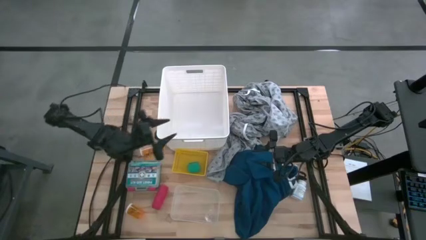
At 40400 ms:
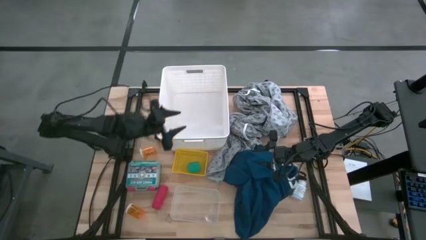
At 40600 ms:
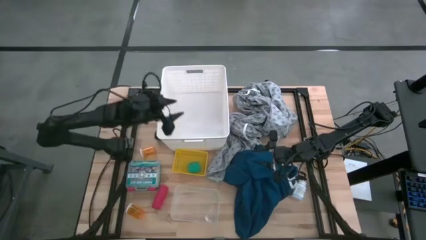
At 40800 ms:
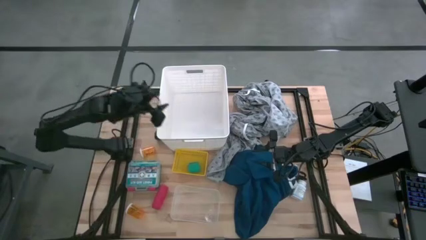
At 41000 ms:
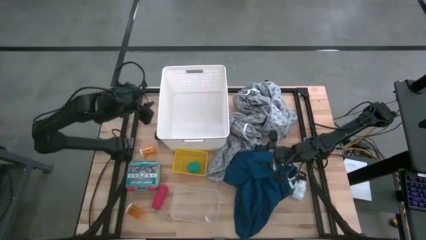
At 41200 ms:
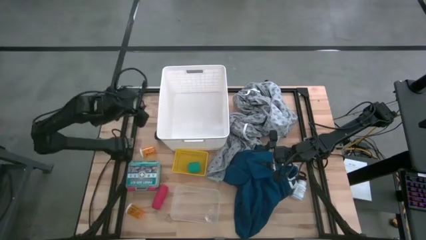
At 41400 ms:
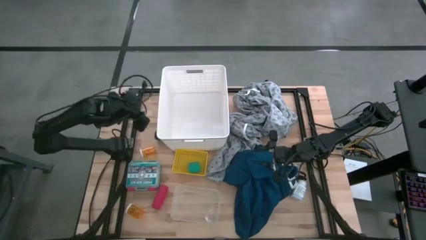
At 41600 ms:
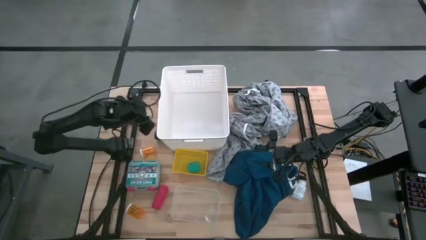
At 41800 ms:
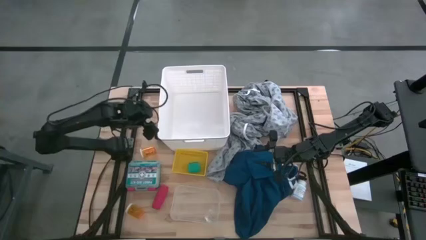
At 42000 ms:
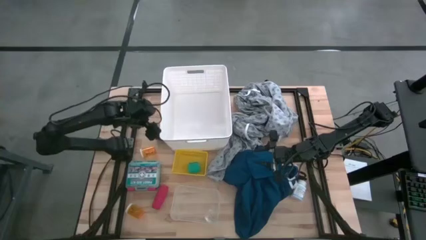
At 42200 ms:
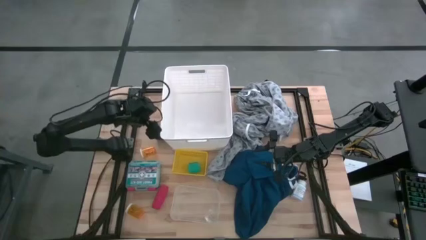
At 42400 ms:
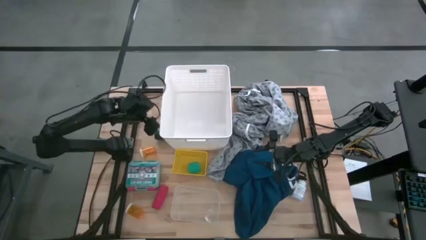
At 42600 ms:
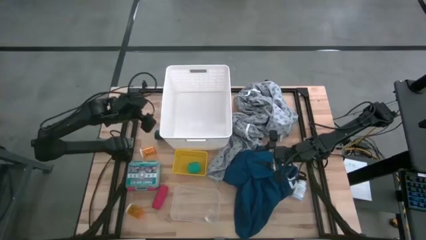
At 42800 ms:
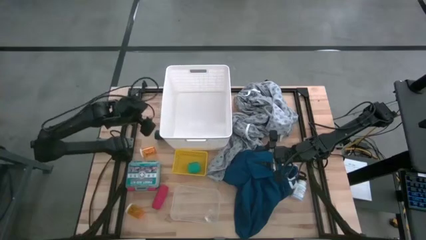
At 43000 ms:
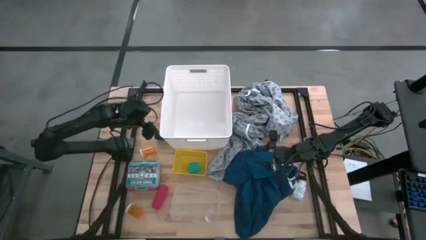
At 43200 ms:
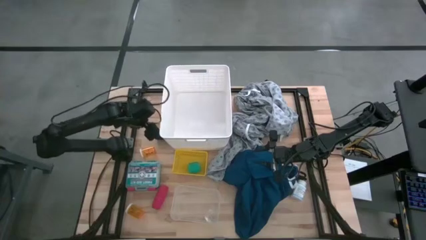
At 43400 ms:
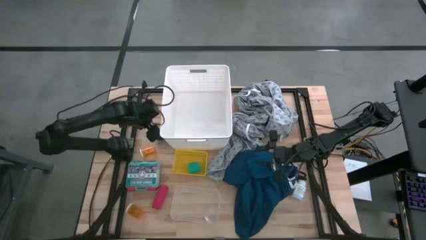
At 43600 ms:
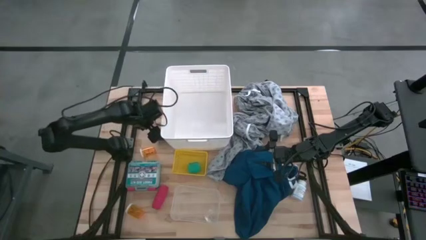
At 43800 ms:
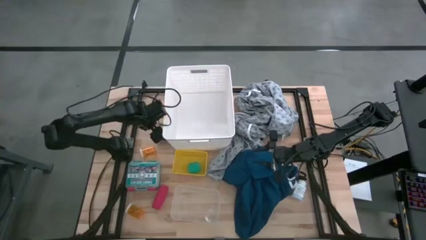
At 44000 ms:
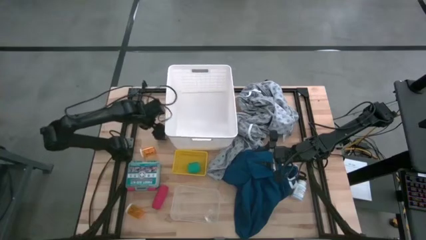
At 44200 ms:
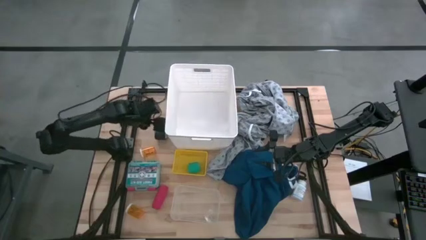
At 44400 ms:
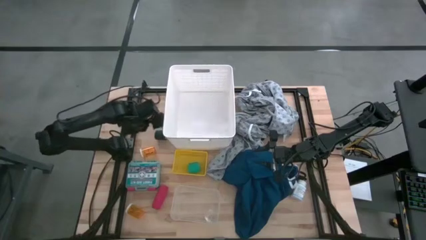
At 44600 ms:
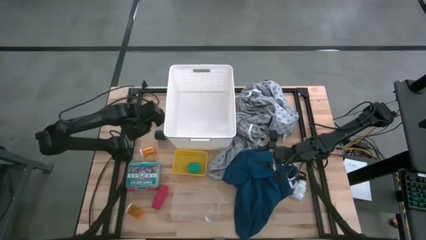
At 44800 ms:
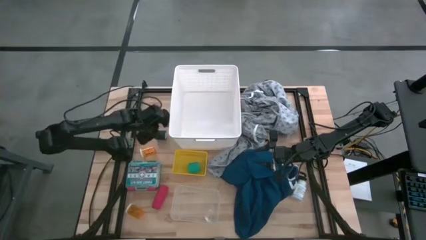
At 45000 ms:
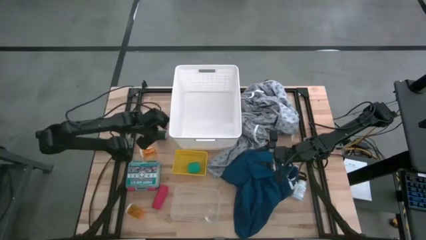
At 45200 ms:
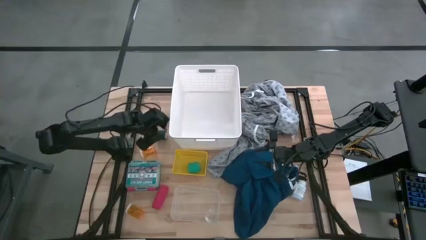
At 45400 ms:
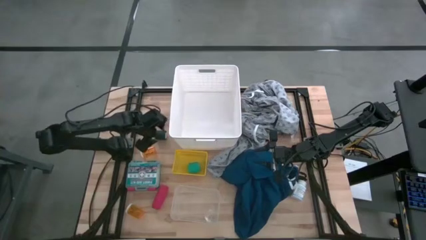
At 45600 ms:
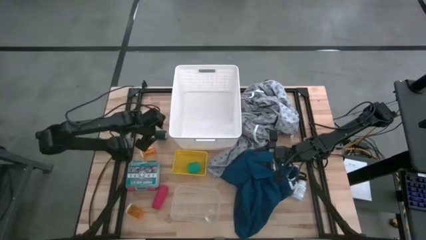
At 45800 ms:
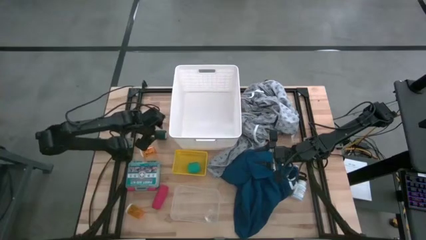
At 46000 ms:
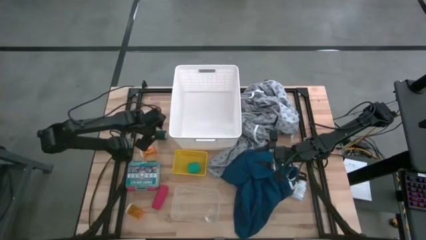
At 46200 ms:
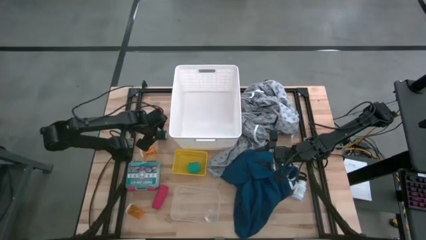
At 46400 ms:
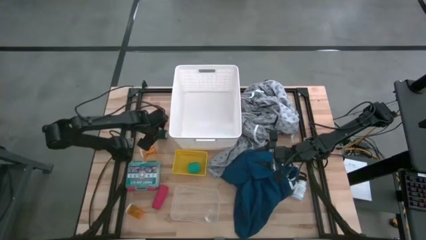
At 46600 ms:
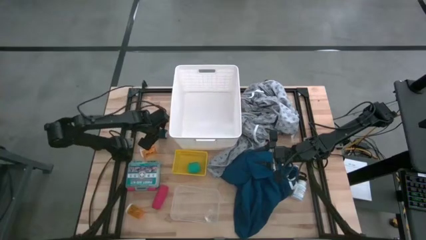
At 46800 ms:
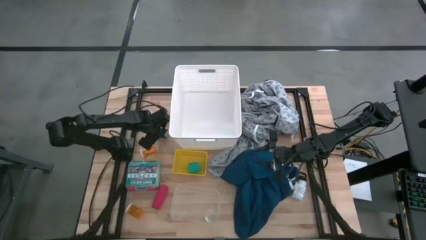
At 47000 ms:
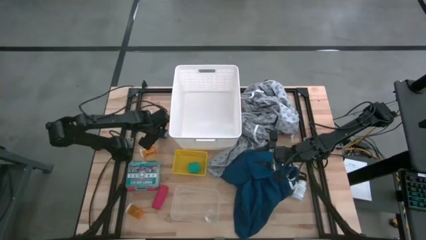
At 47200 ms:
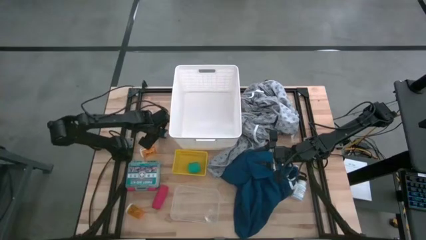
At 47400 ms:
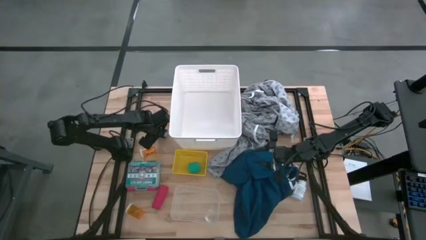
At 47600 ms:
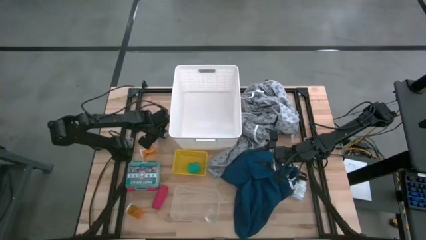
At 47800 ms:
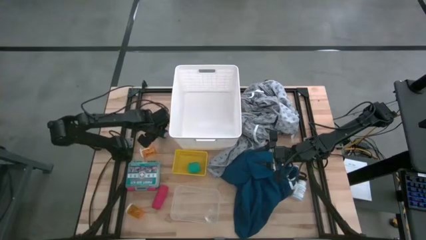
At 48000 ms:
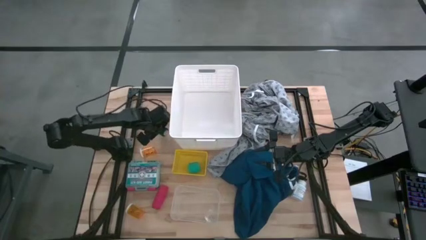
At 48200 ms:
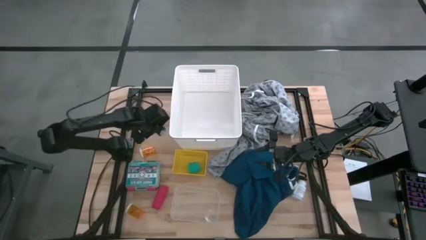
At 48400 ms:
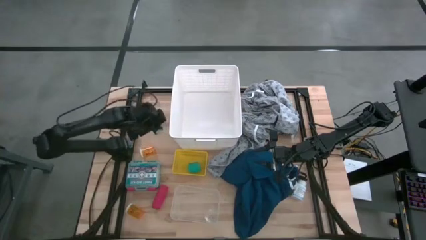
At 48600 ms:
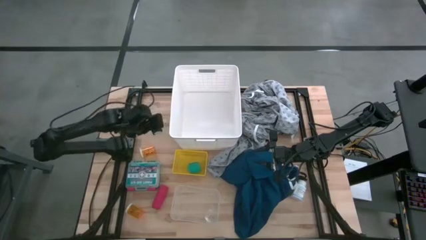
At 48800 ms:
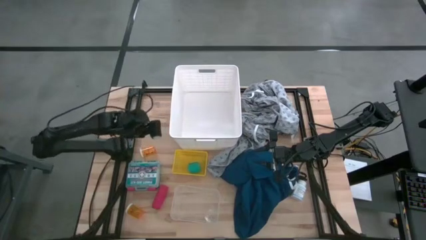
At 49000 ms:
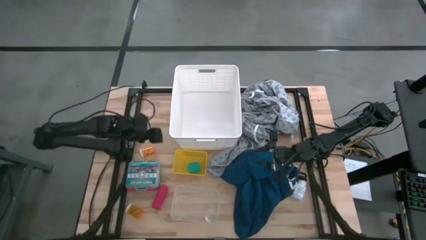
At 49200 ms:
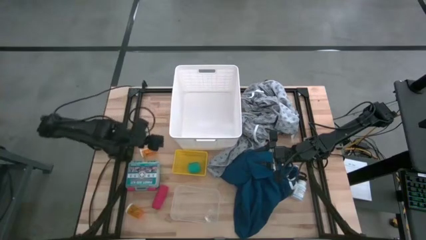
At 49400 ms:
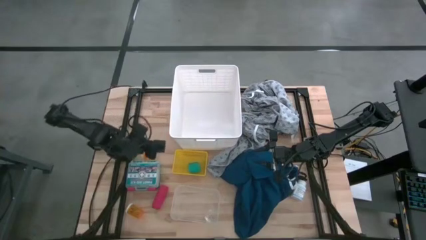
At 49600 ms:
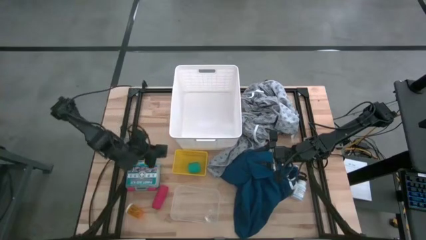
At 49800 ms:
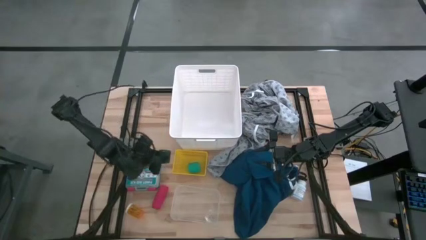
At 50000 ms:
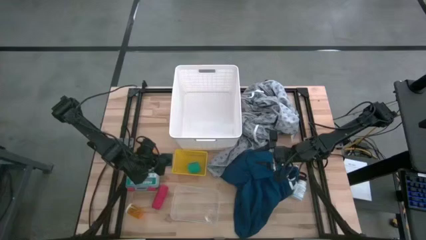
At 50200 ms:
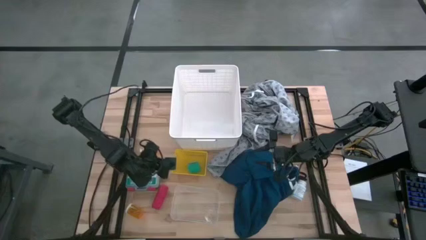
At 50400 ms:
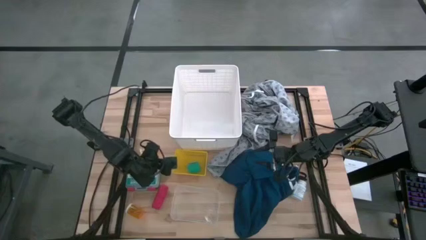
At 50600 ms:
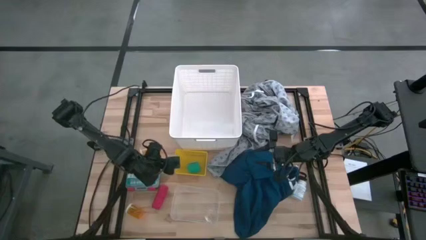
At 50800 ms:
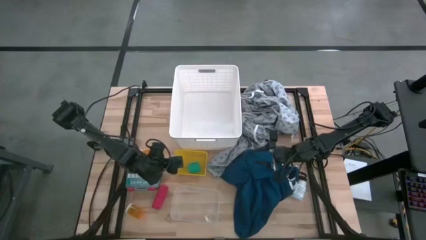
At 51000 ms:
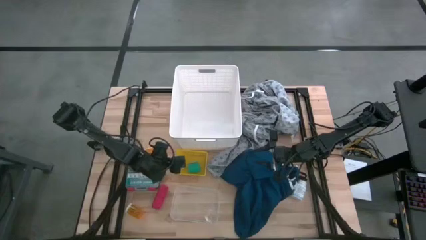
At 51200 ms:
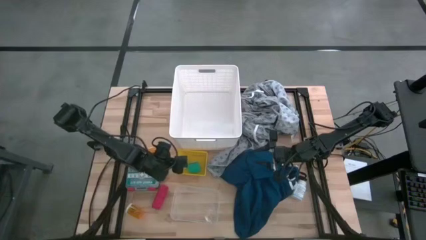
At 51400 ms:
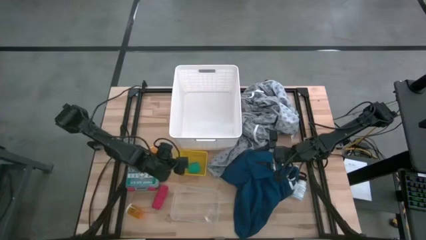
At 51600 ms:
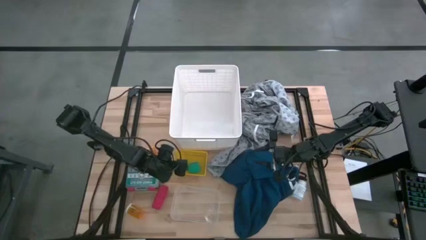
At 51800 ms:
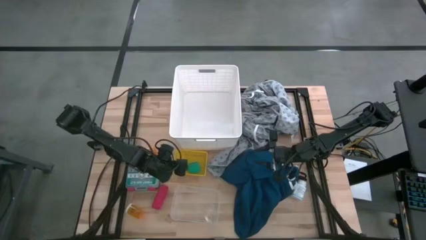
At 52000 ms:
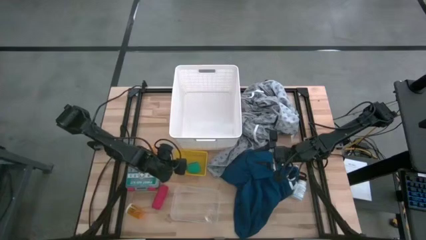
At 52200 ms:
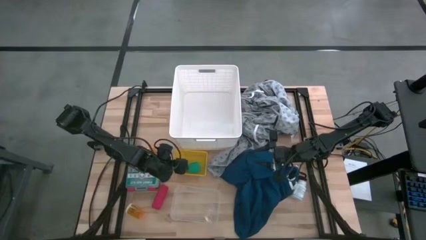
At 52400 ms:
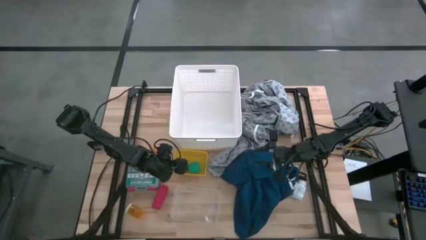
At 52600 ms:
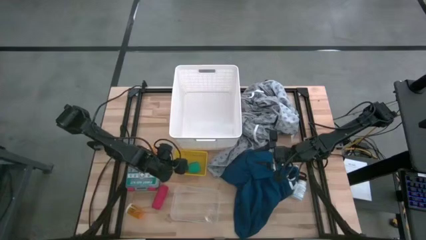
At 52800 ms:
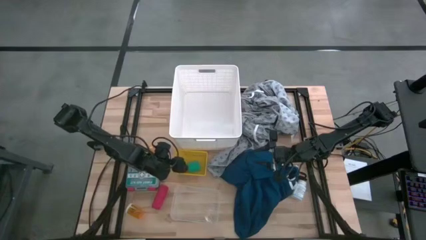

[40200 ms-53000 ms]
Task: Pick & Place Medicine items
Put the black bandage into the yellow bin
